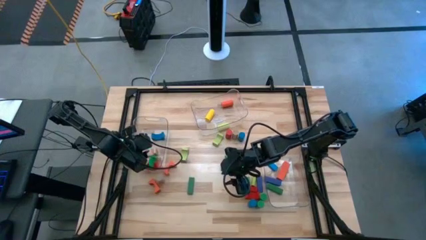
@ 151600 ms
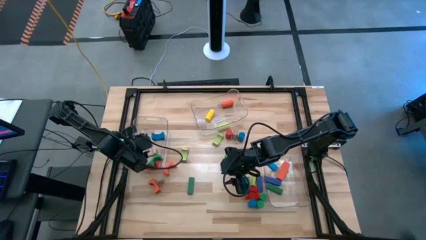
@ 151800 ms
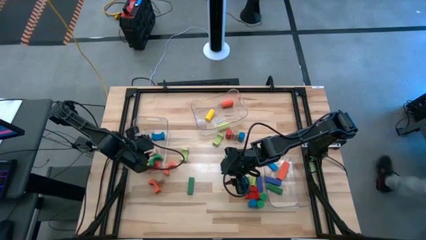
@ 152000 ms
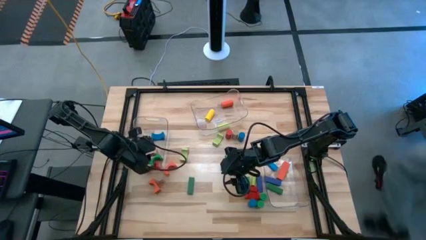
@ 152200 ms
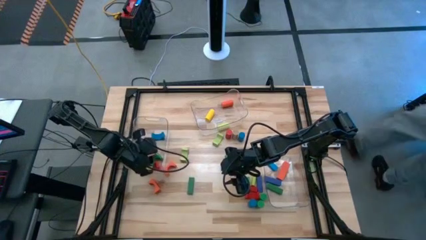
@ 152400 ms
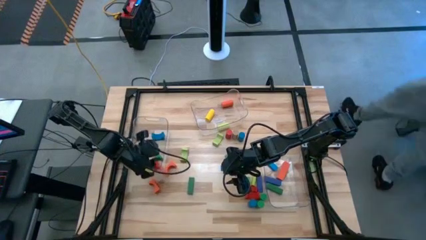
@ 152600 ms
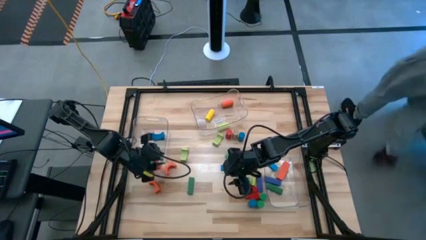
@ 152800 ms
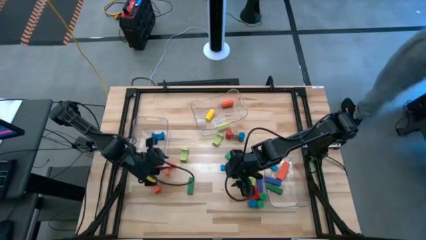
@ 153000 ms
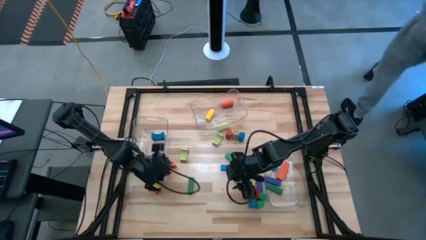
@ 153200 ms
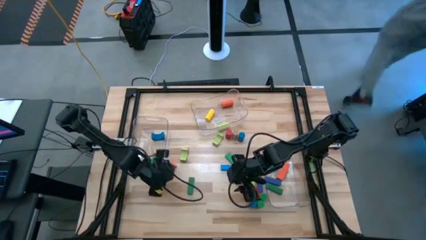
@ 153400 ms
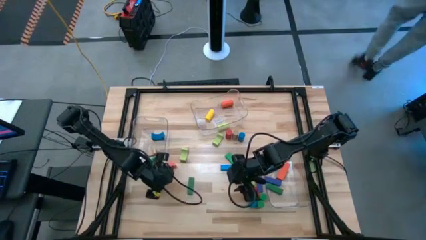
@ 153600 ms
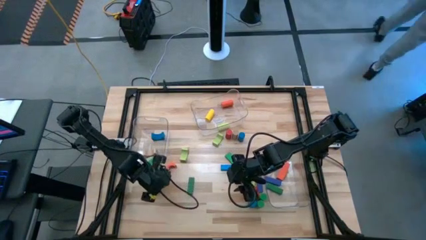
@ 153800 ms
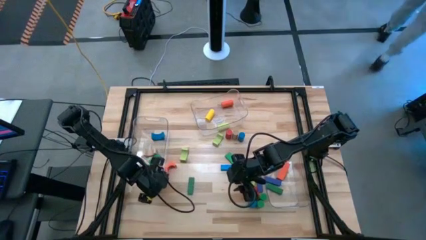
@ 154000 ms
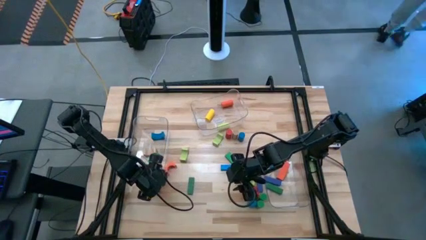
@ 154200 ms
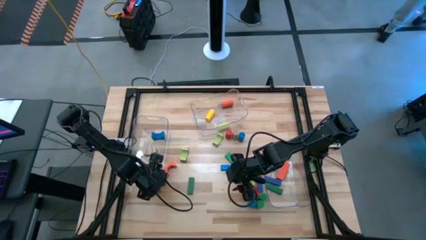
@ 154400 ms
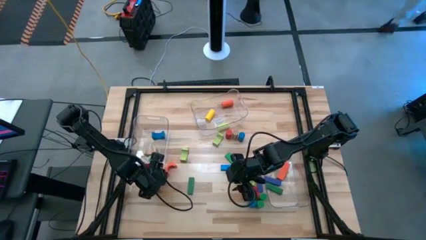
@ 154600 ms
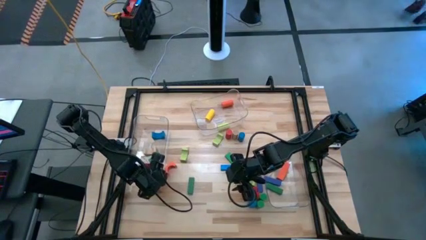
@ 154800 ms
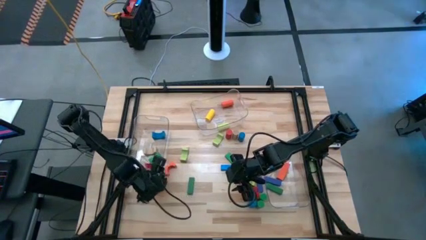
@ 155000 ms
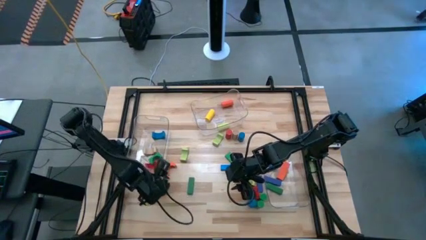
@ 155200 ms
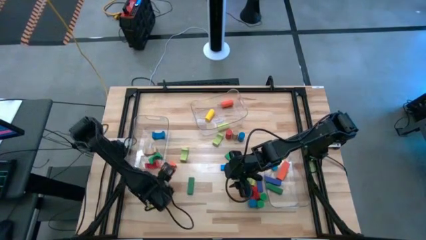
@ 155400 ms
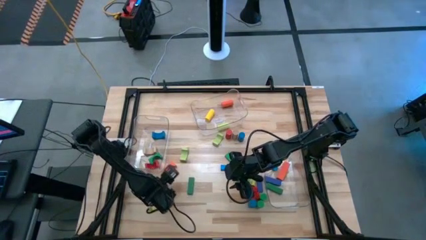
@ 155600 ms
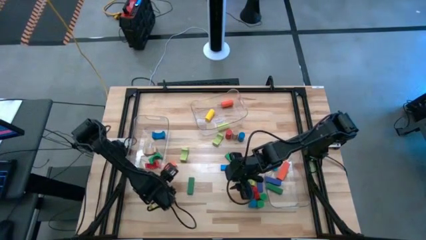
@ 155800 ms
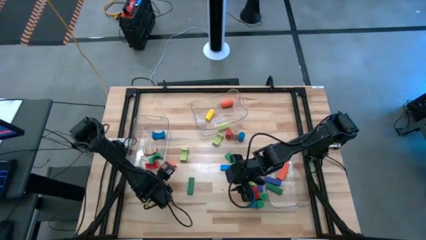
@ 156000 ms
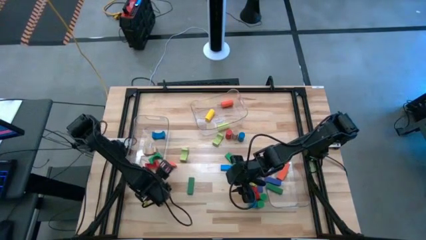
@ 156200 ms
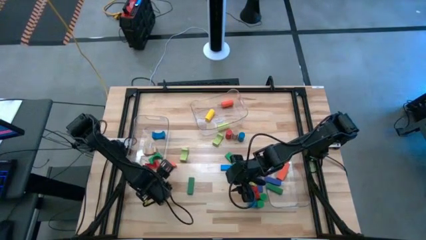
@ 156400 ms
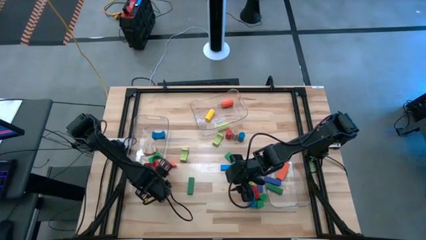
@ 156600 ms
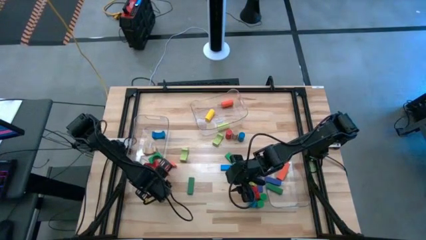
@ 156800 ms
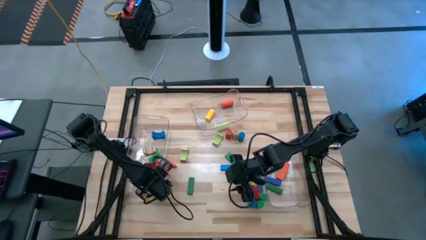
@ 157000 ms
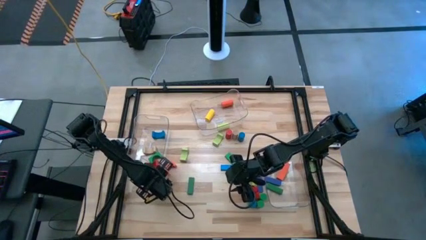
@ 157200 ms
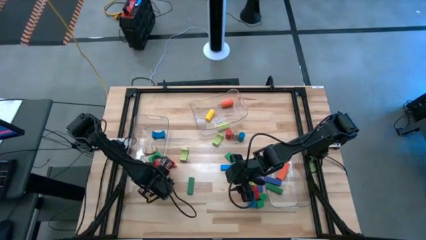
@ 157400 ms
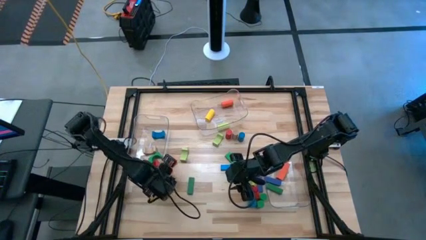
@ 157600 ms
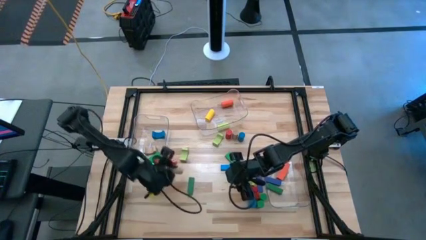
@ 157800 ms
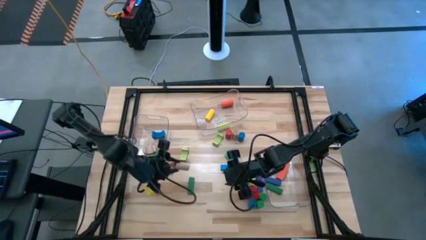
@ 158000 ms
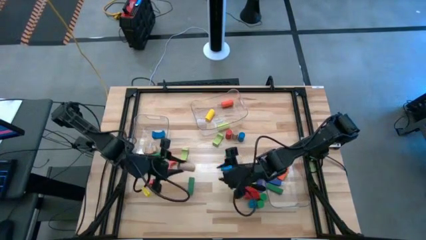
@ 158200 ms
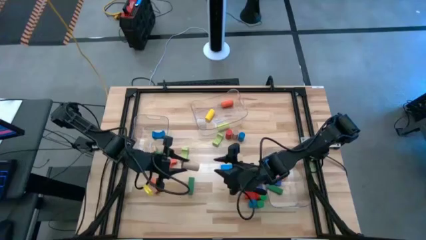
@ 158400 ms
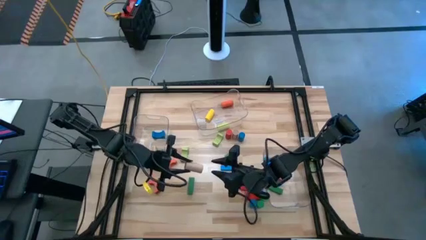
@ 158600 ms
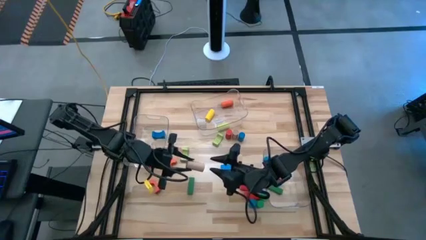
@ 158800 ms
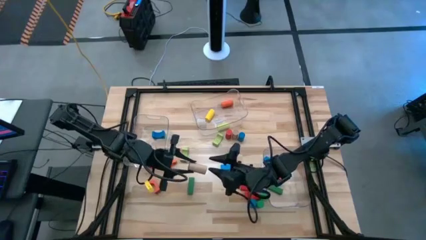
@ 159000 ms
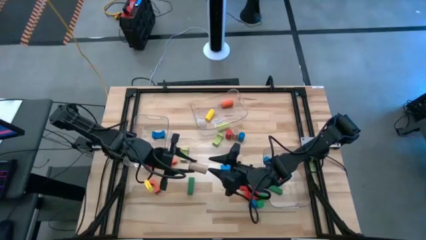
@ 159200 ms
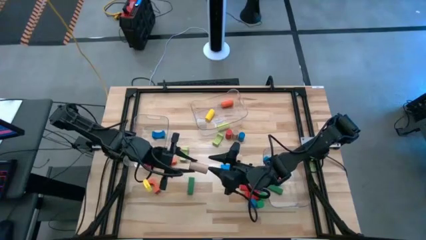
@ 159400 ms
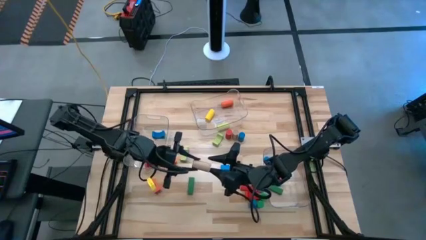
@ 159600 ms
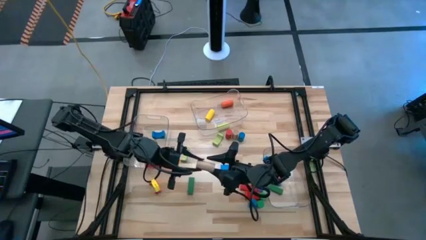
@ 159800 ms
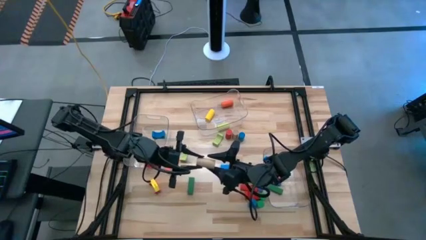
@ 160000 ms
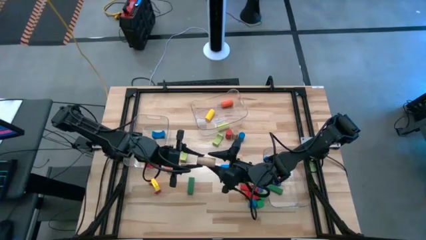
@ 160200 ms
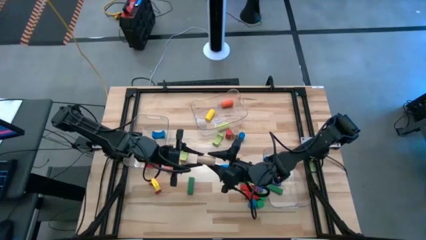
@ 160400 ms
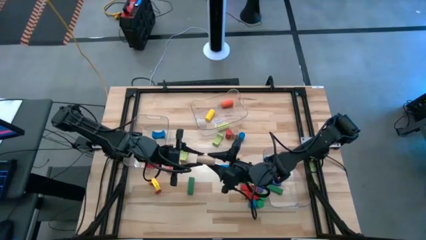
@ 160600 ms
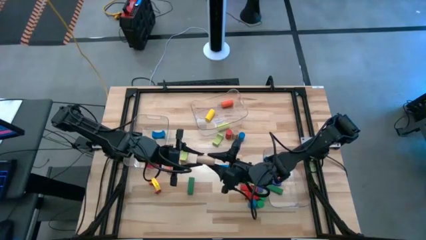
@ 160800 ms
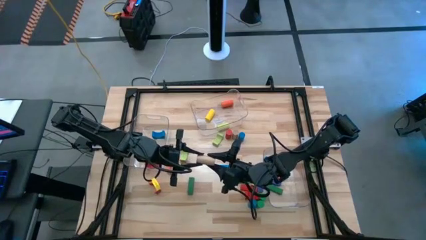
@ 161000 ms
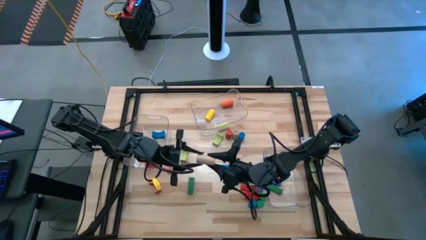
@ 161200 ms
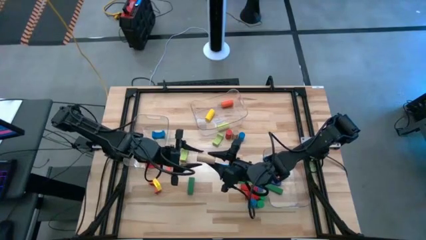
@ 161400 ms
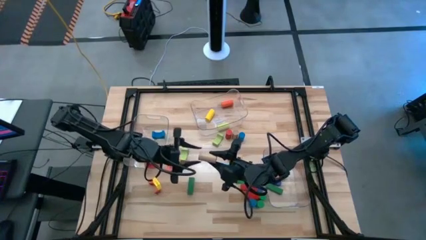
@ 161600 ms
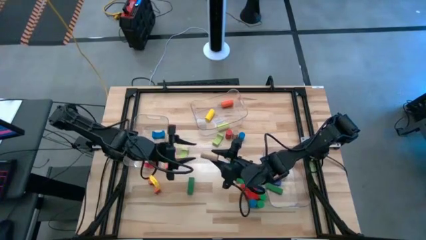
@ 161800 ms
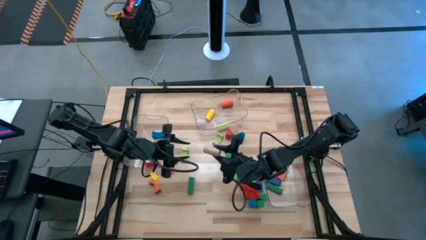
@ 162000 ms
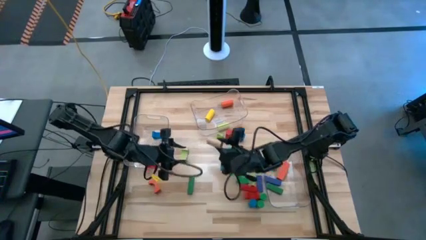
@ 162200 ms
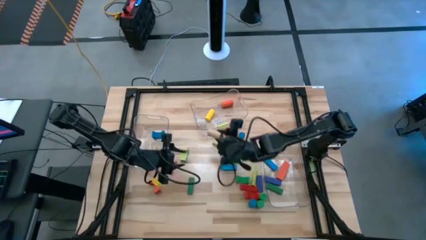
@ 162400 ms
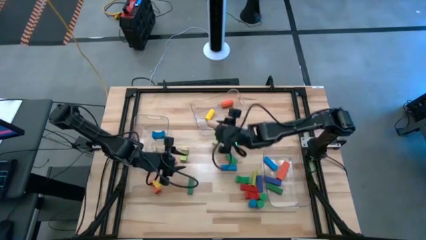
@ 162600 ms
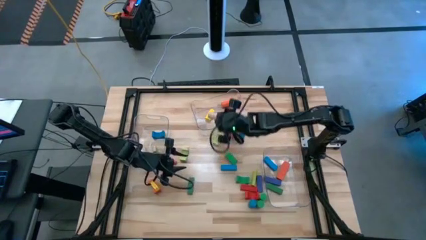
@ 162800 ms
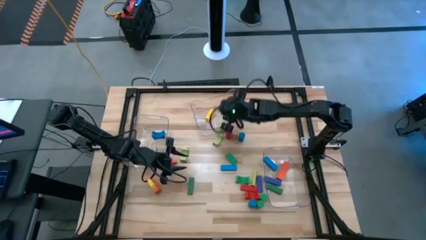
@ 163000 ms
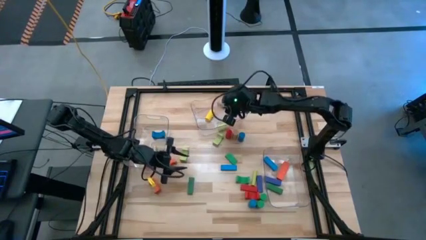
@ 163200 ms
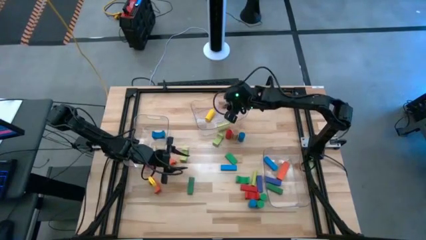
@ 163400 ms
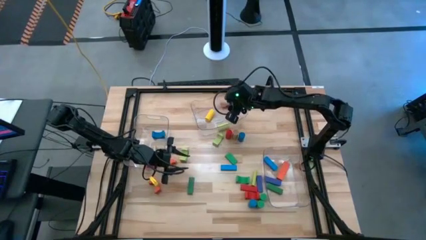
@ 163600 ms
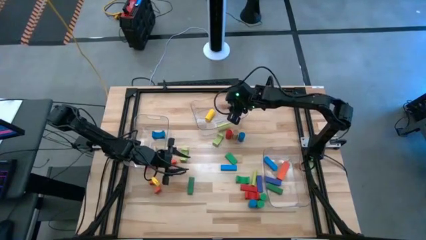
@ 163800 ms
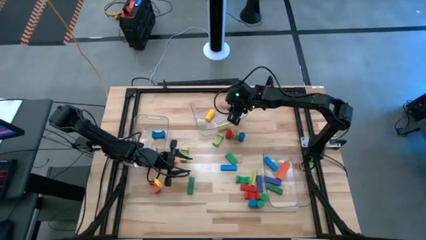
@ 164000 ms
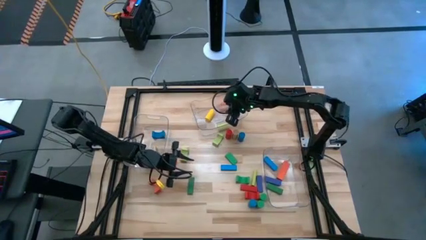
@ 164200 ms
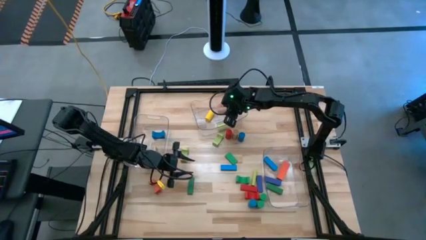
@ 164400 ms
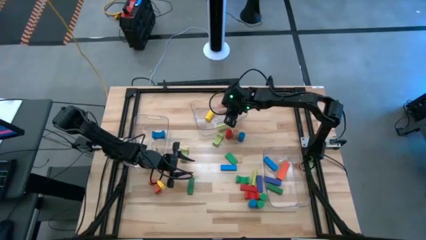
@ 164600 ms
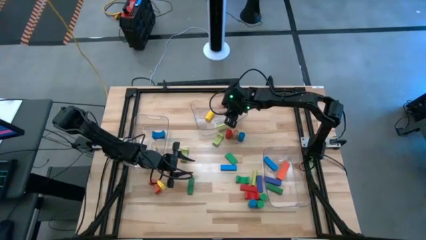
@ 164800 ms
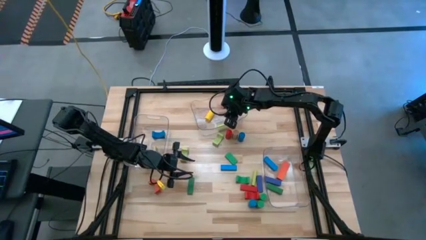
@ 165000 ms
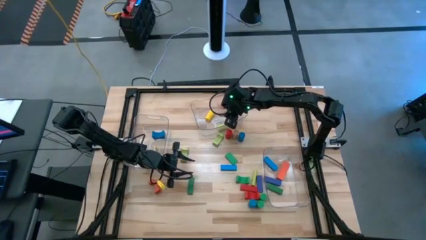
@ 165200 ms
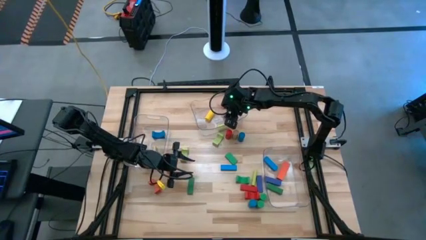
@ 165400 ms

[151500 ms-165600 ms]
Task: Sort blocks by size
Put the brown cylindrical block into the top transparent bin
